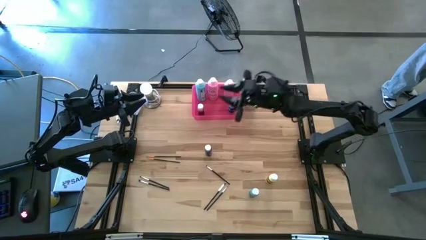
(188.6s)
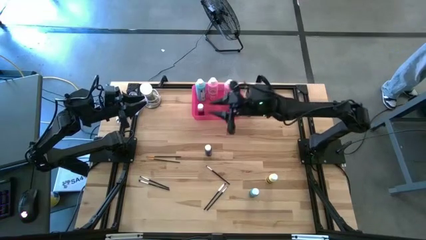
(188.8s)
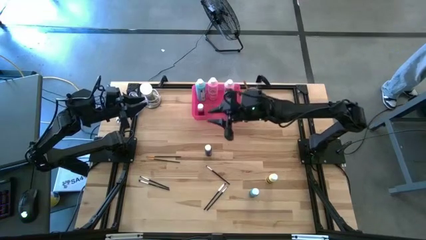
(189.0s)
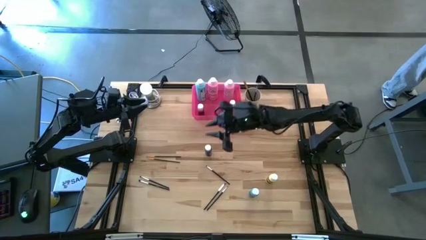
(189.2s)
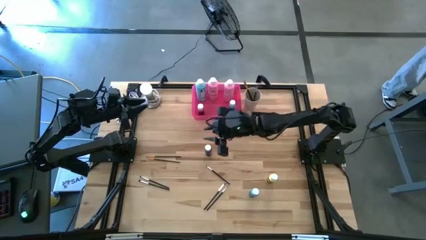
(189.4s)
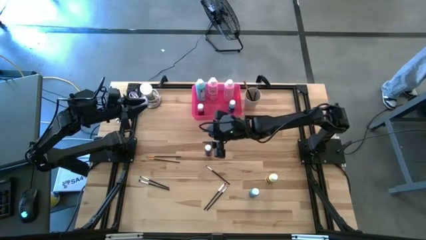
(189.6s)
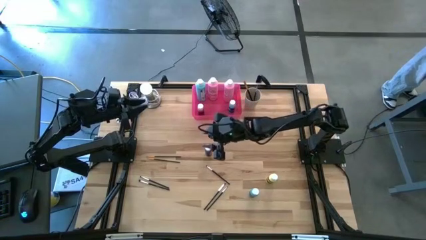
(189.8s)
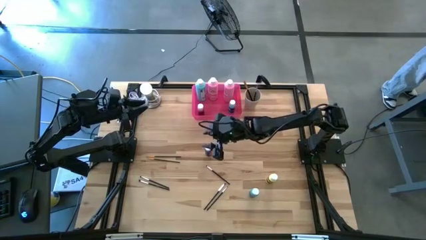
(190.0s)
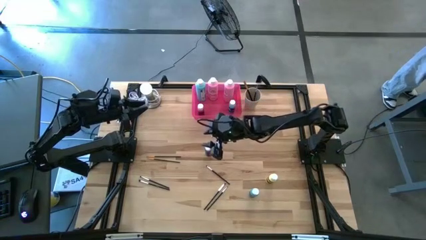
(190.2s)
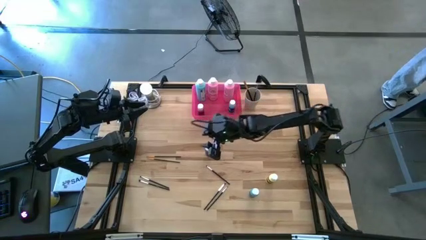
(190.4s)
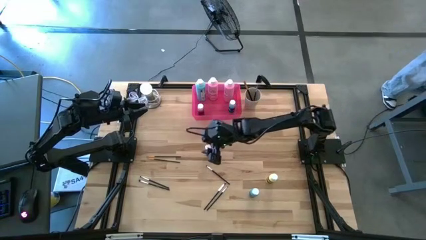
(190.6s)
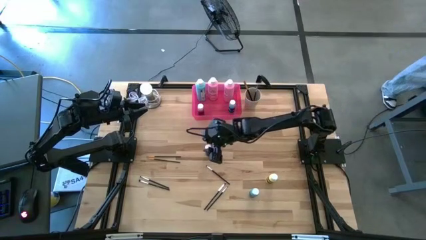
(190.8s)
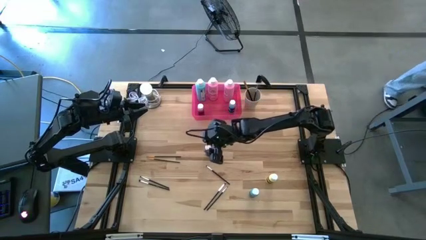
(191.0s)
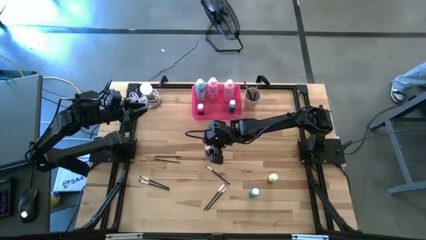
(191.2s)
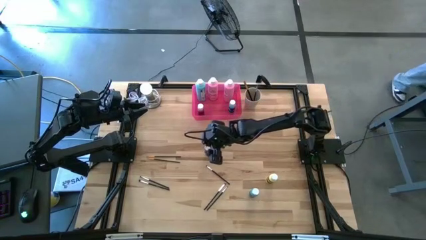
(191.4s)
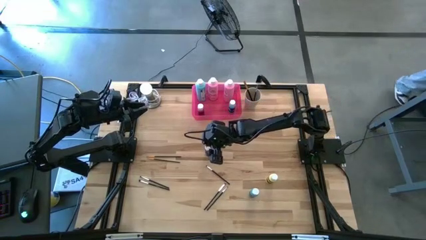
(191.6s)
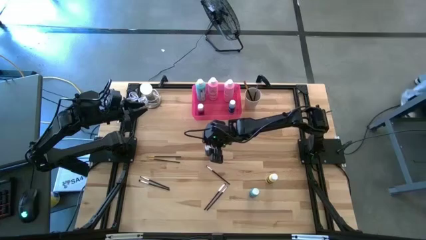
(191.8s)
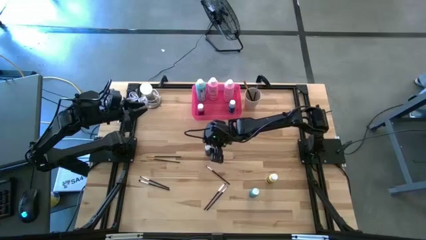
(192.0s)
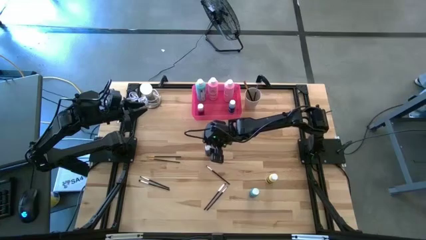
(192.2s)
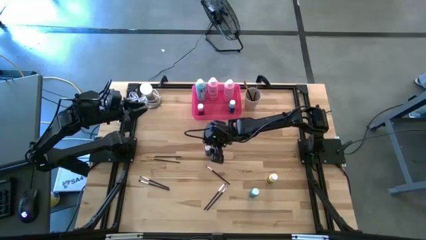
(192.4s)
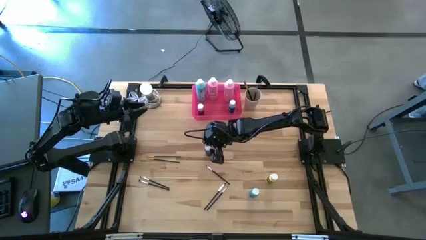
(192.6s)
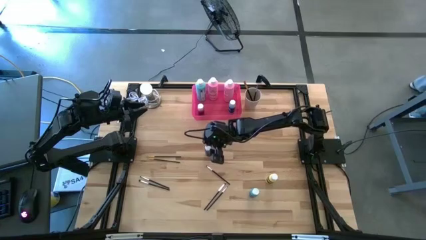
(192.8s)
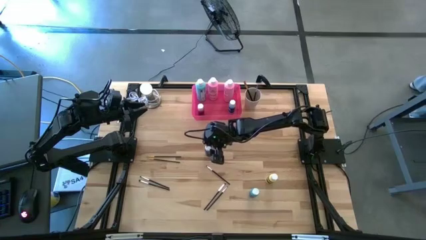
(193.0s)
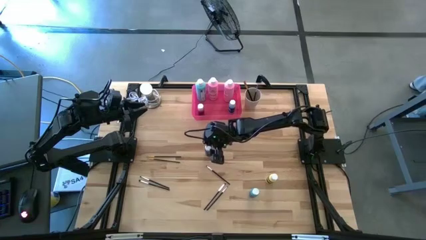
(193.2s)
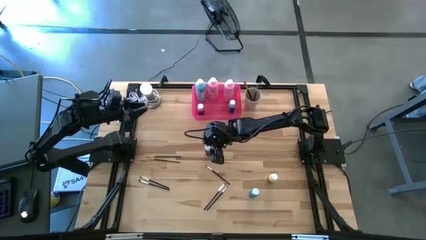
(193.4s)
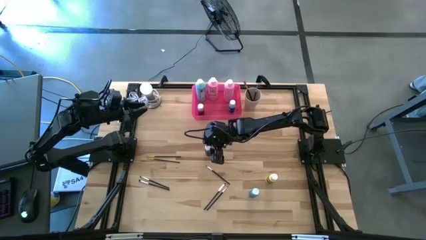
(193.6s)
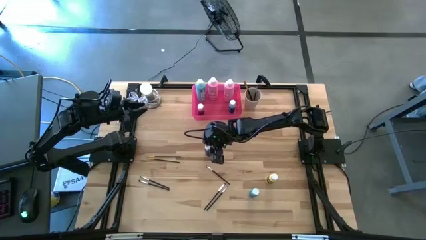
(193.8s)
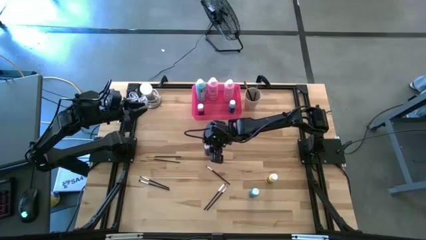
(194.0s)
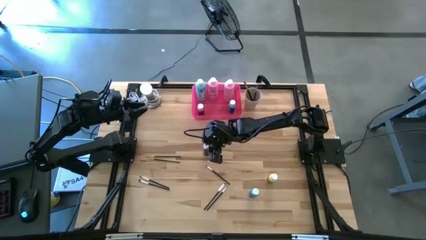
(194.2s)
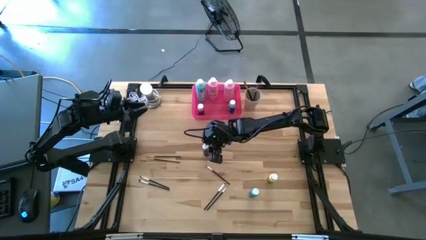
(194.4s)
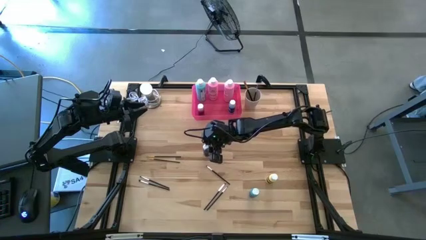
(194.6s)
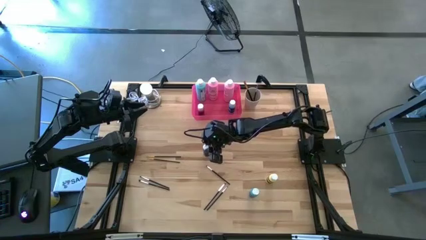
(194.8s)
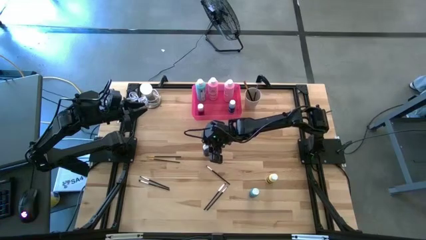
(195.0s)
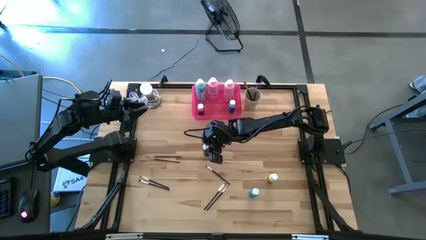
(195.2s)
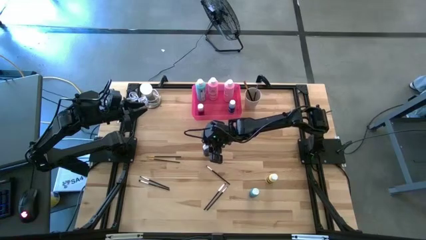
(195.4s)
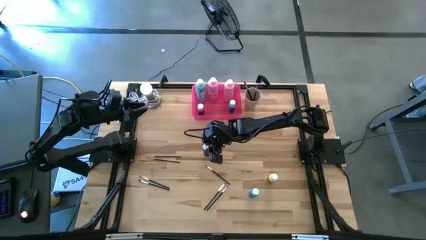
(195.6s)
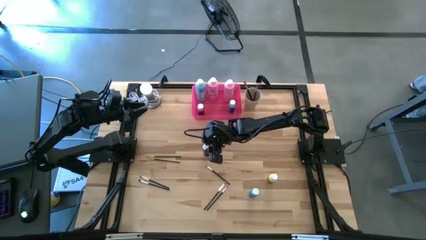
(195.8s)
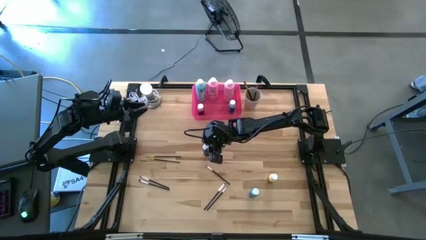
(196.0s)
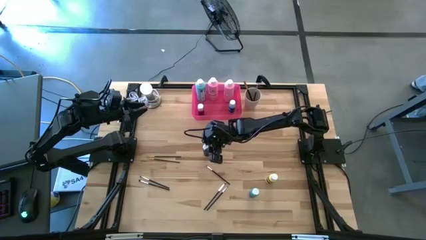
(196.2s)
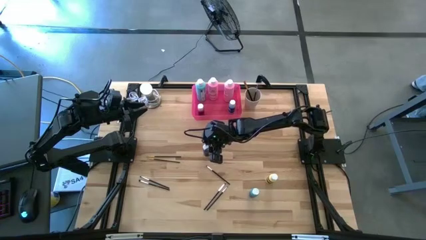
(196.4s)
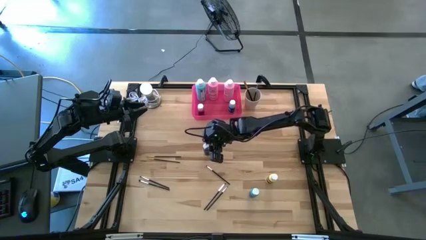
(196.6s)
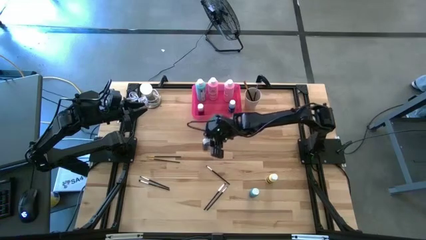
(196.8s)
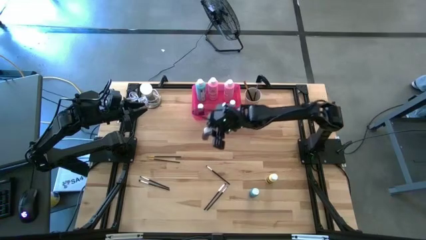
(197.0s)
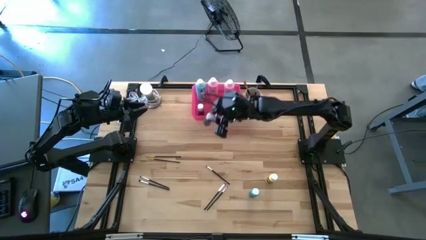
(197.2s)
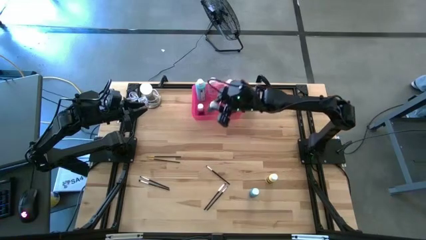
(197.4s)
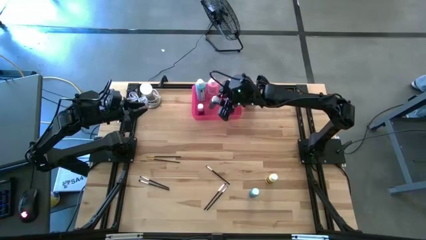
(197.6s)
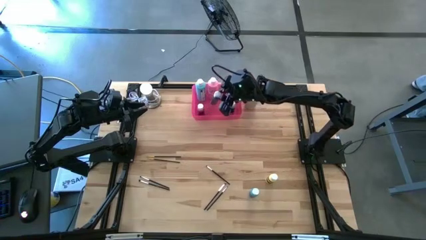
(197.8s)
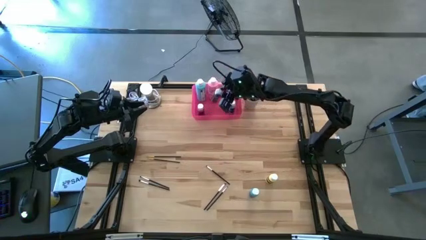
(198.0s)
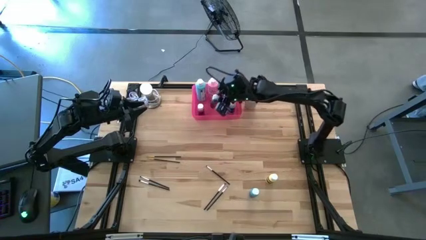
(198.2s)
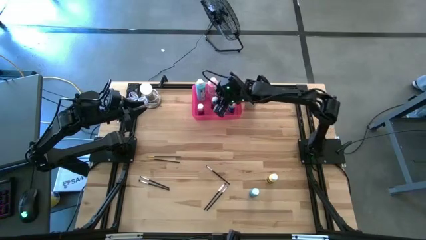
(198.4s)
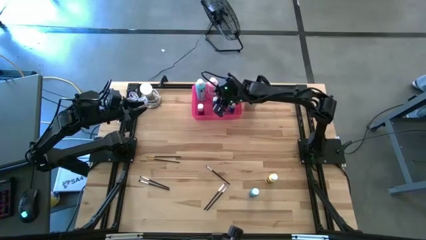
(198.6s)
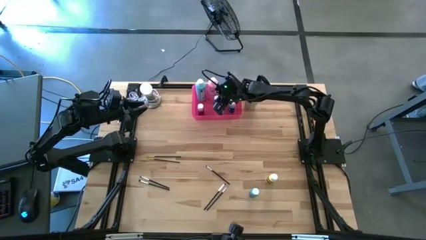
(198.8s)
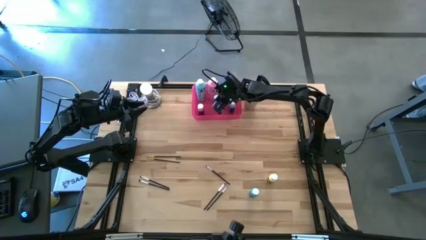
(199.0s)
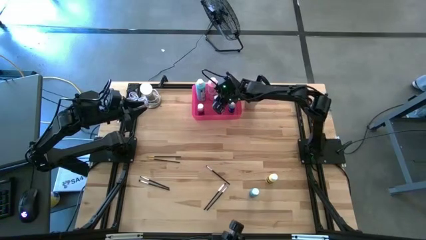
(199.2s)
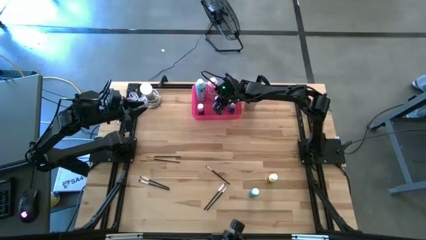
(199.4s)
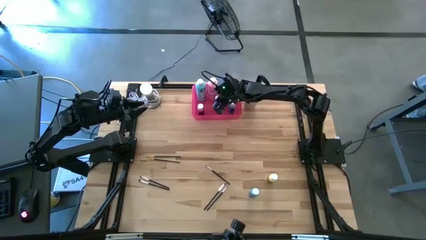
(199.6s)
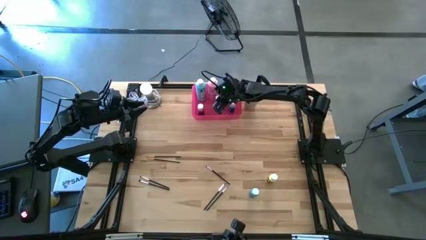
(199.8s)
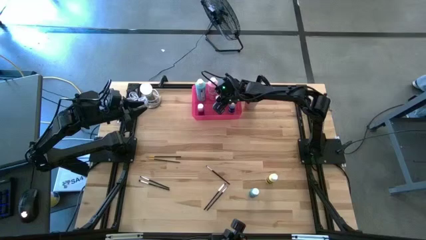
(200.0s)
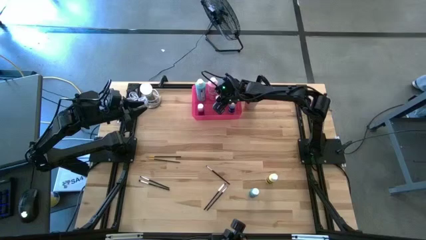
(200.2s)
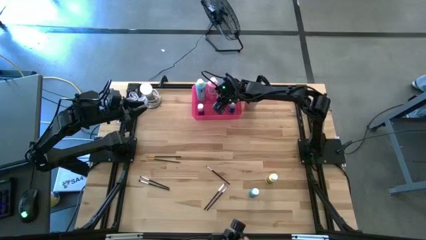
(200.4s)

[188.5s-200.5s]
Task: Pick & Place Paint Supplies
Put the small purple paint bottle into the pink bin
